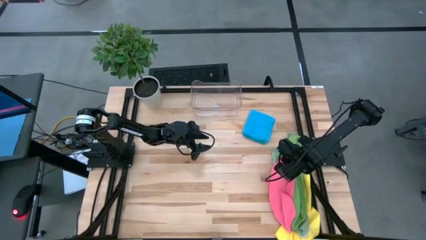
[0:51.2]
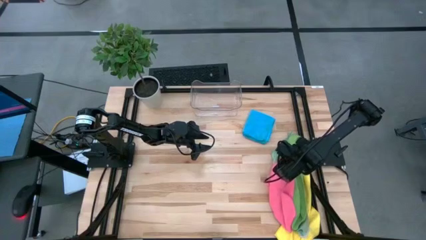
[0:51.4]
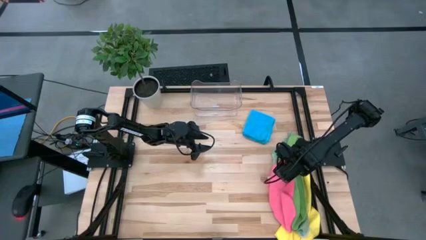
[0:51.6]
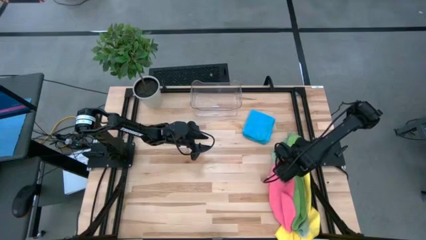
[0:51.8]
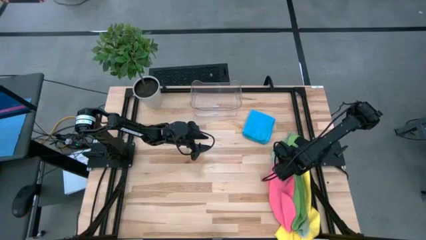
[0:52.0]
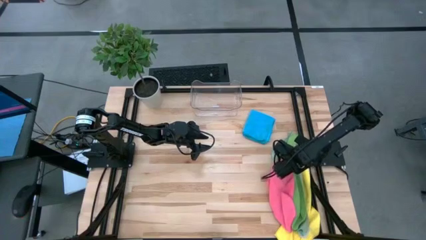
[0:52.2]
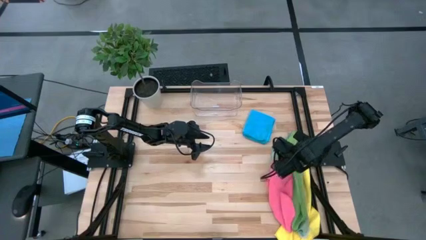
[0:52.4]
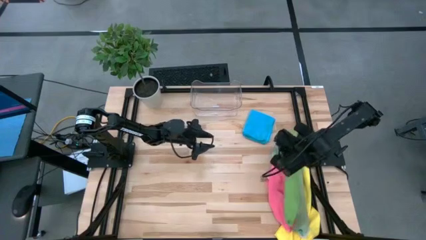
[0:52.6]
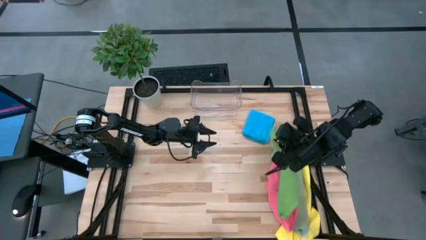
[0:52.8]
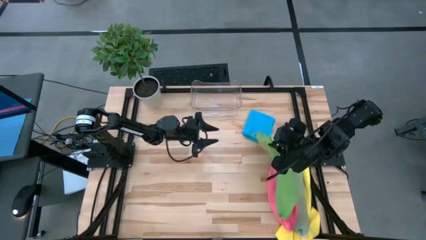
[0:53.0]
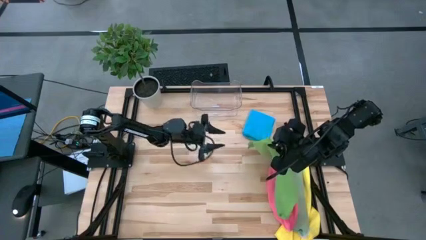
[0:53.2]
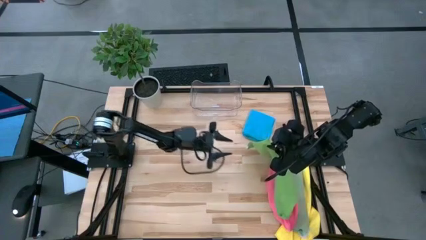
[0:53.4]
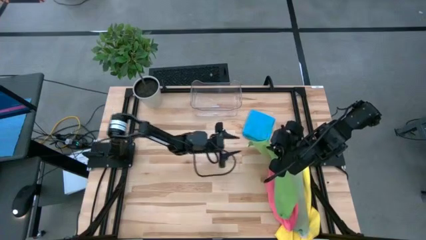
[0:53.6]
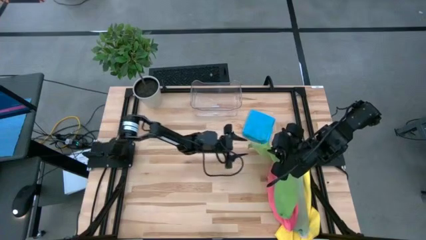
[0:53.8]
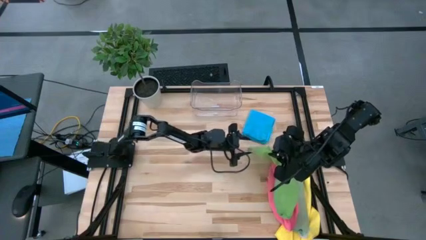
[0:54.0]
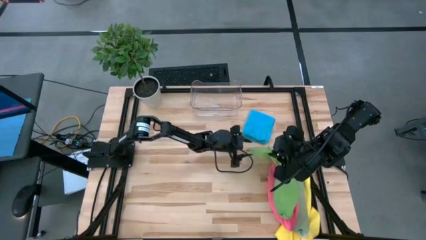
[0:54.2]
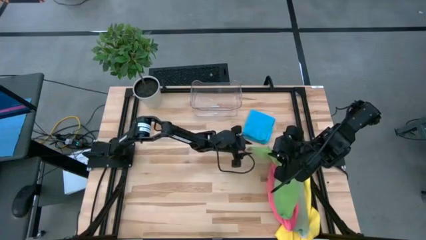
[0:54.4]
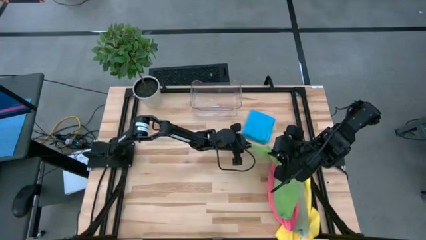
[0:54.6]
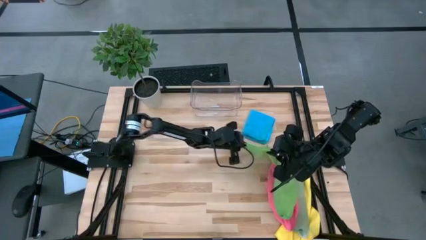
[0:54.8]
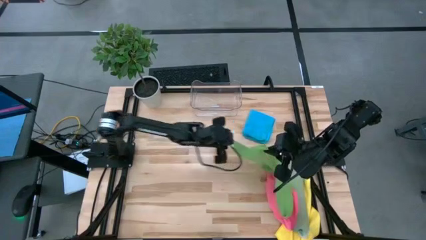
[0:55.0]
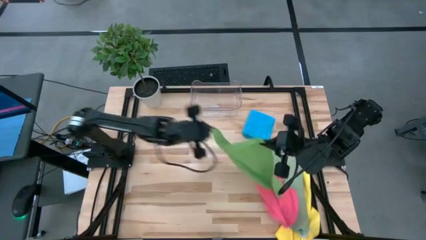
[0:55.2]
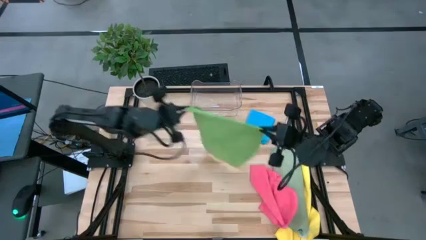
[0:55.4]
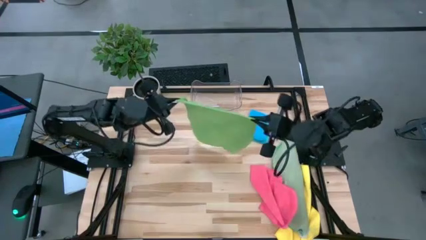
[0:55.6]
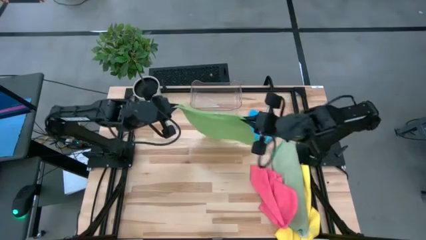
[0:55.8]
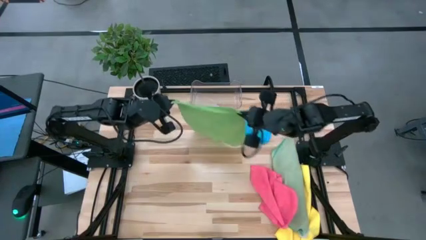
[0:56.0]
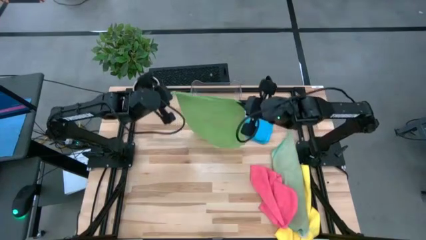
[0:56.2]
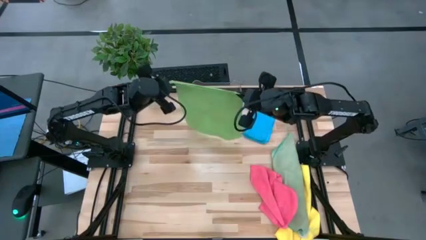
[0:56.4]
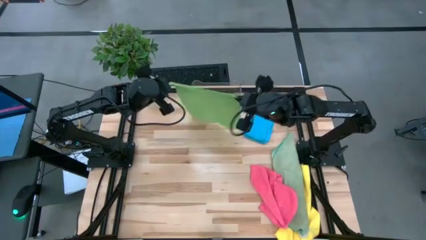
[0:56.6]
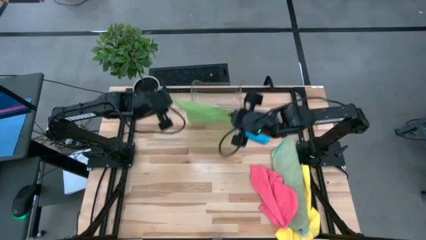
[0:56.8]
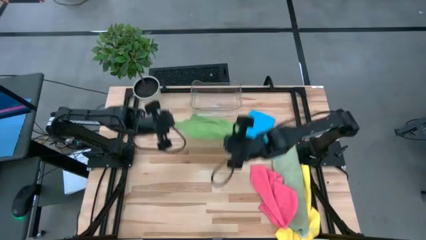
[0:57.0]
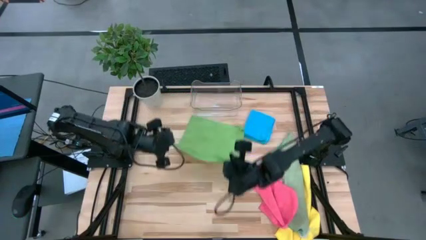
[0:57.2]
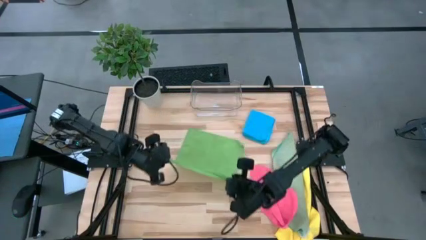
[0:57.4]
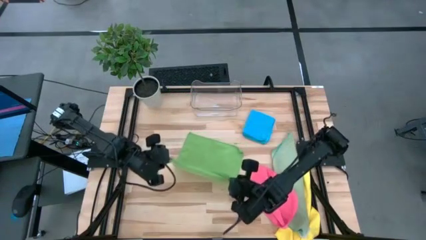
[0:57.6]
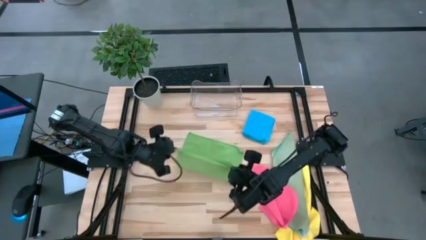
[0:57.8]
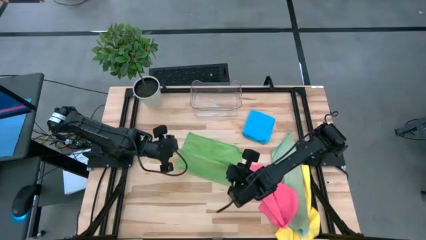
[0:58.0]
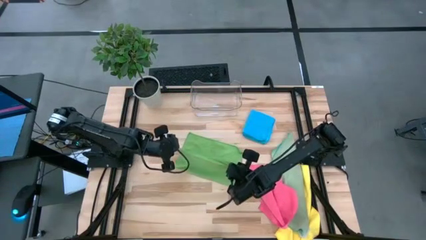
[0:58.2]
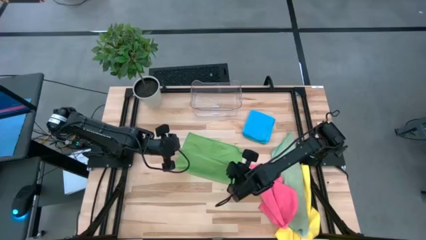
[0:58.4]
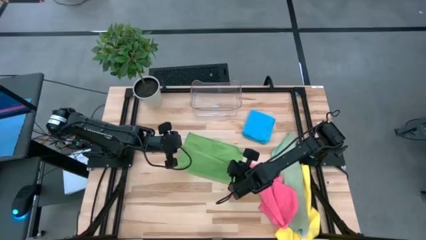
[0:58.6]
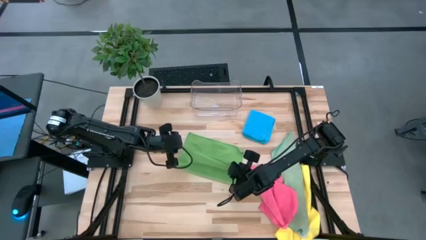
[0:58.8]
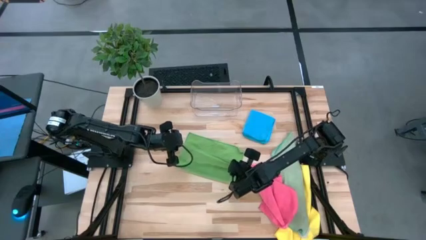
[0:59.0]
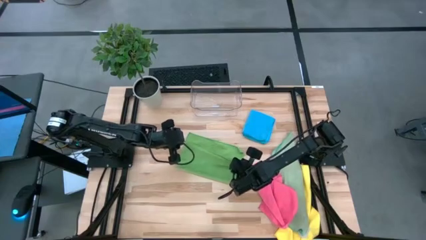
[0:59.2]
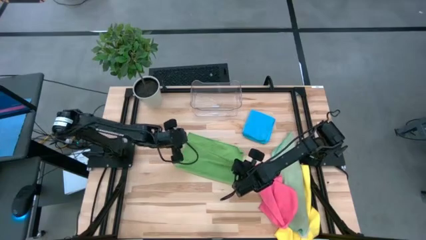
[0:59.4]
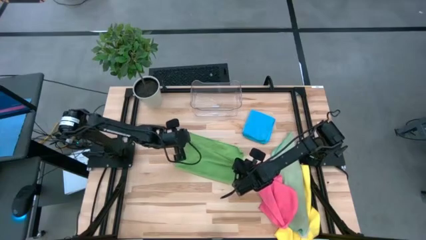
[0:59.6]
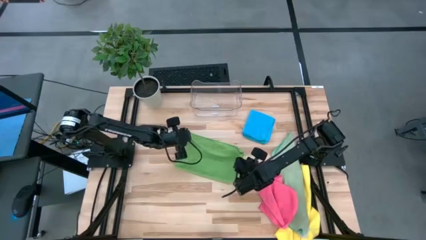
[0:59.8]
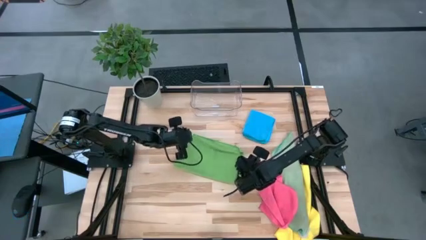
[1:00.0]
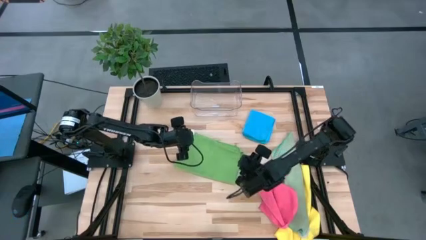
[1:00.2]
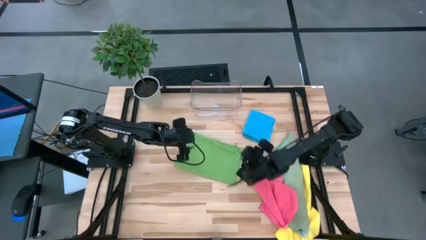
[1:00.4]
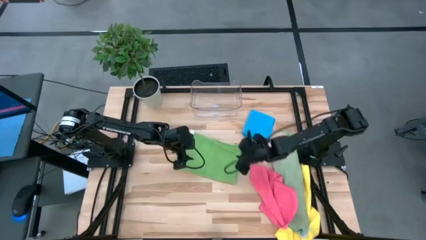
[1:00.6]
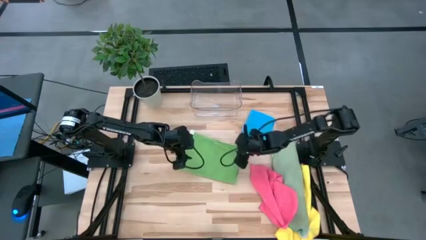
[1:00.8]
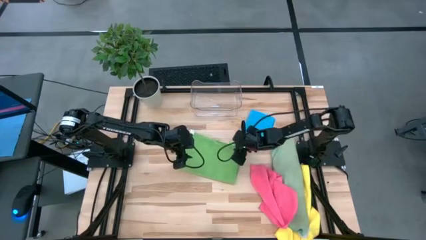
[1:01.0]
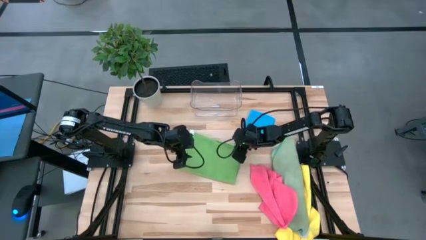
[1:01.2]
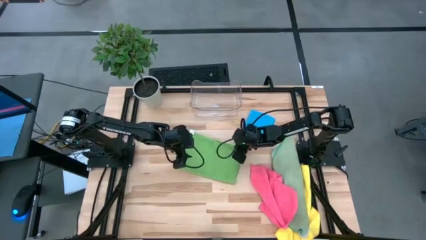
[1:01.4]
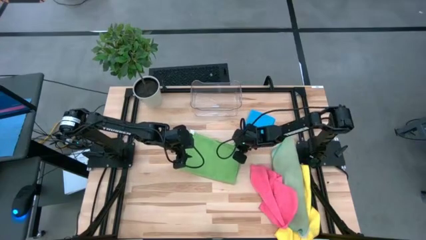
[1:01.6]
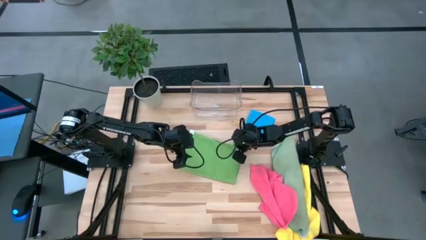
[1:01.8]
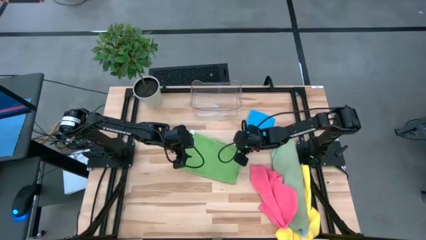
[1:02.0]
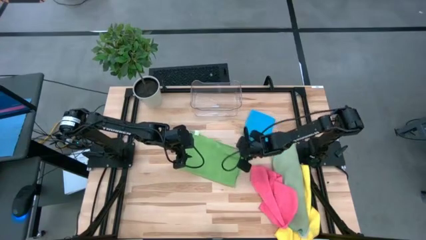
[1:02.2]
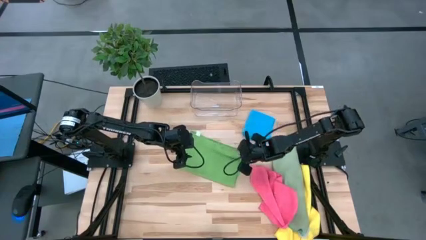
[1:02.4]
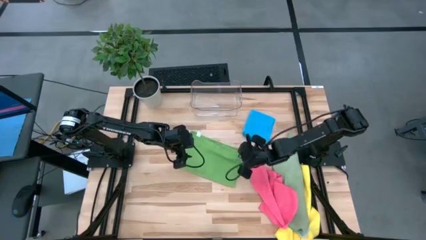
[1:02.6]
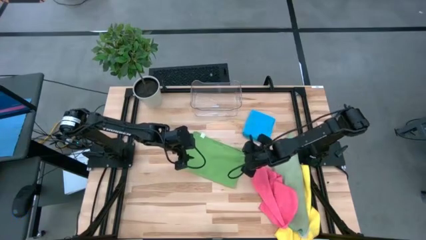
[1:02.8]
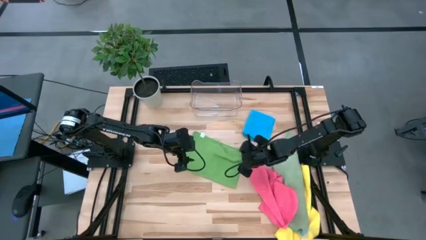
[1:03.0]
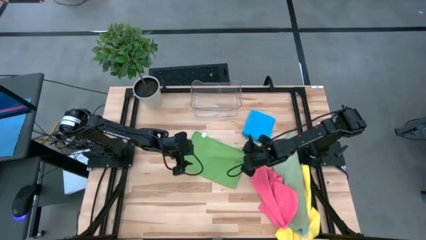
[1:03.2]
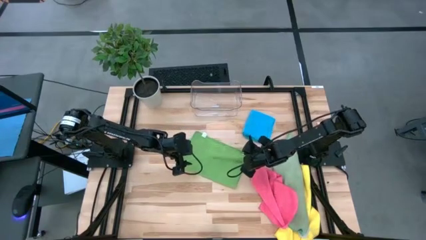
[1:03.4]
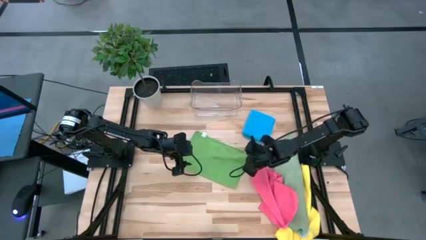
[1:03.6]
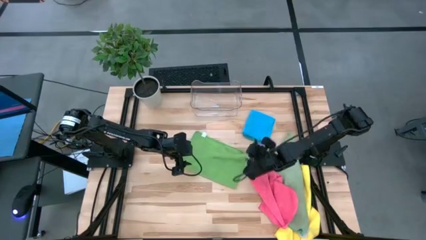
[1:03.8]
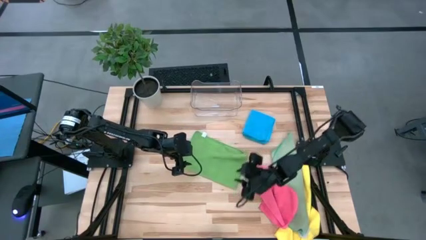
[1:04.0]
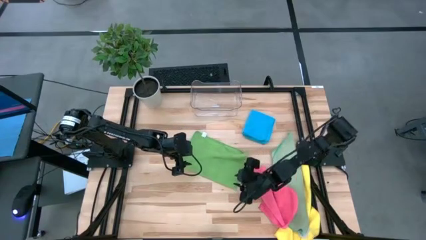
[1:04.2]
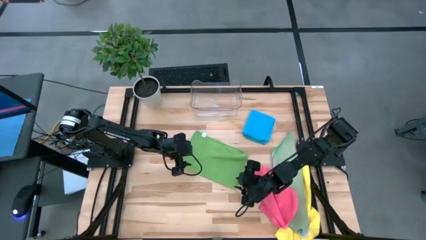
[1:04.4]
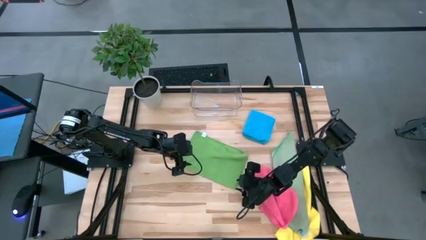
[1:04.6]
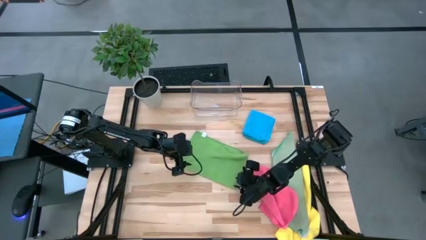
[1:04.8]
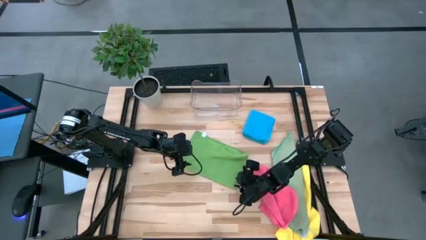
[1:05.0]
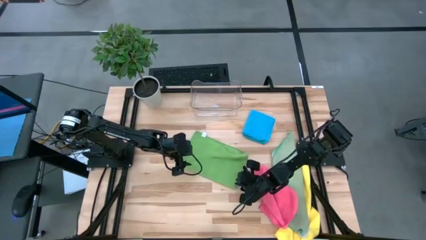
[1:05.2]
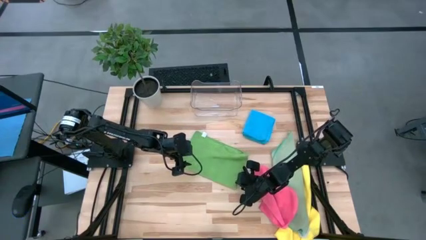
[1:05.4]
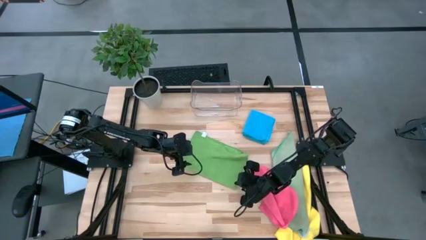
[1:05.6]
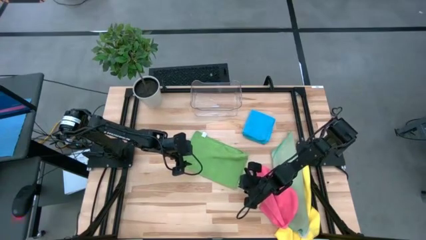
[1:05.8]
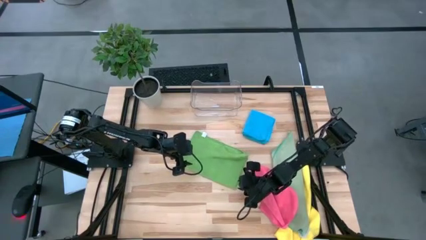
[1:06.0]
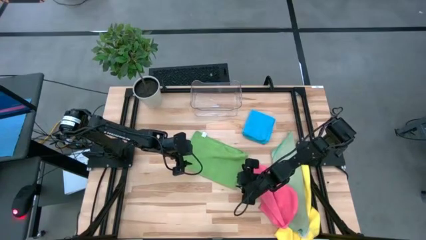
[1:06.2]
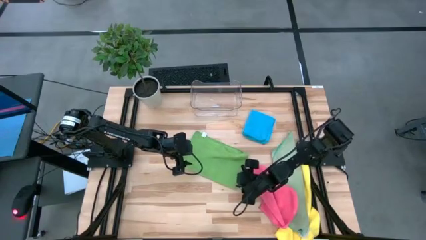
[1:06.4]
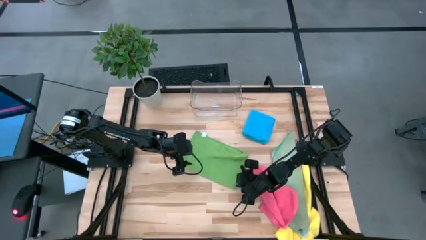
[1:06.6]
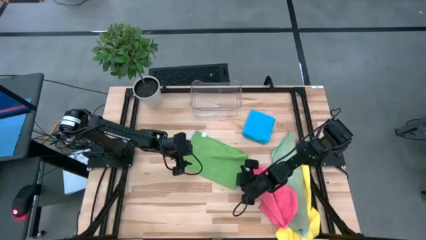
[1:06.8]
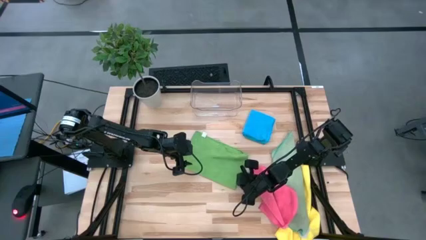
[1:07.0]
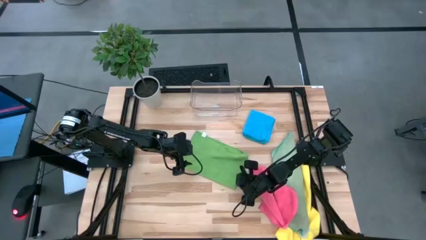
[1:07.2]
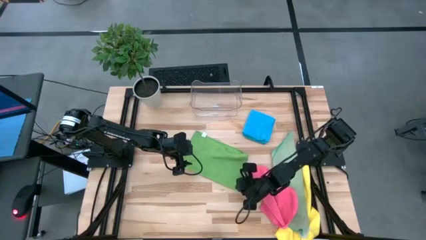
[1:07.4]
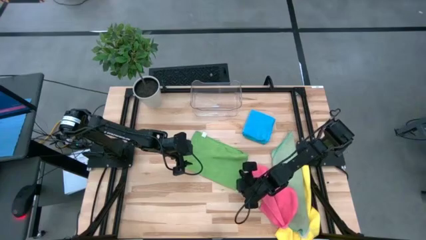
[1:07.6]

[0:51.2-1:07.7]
Task: Fold microfiber towels
Fold the green microfiber towel
